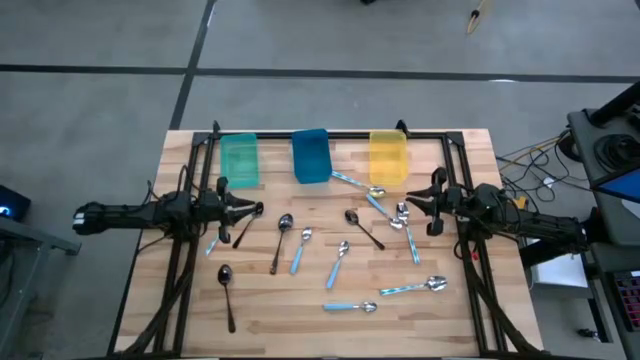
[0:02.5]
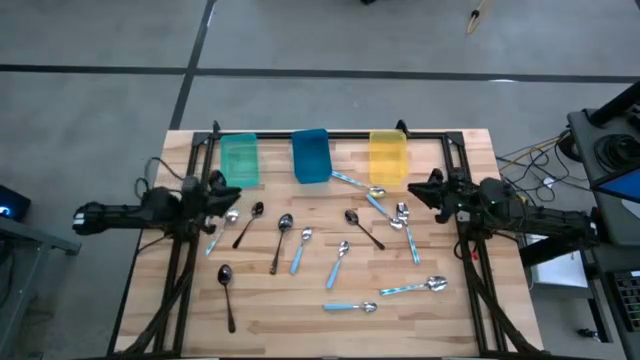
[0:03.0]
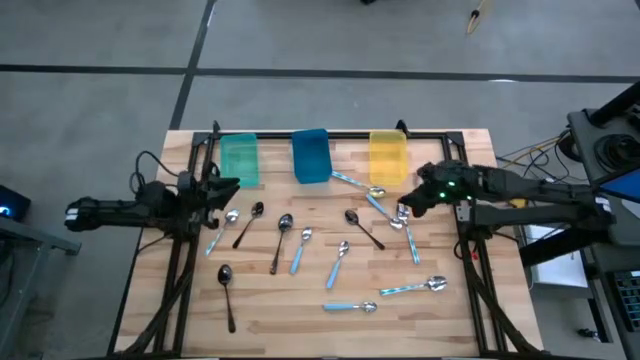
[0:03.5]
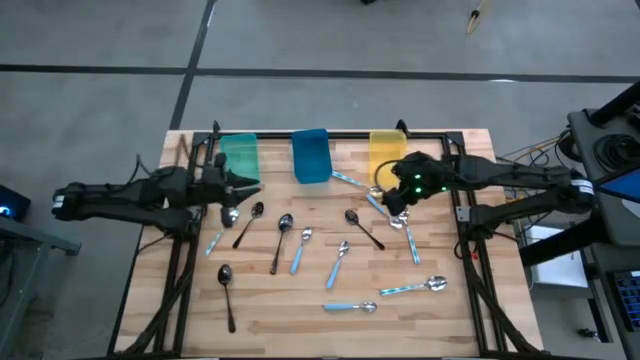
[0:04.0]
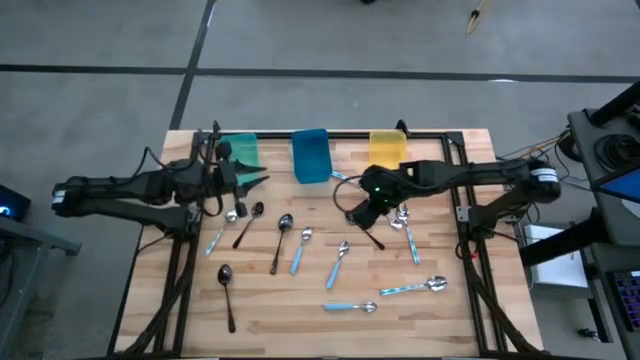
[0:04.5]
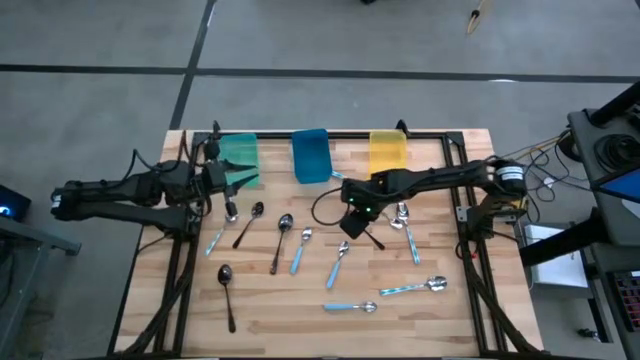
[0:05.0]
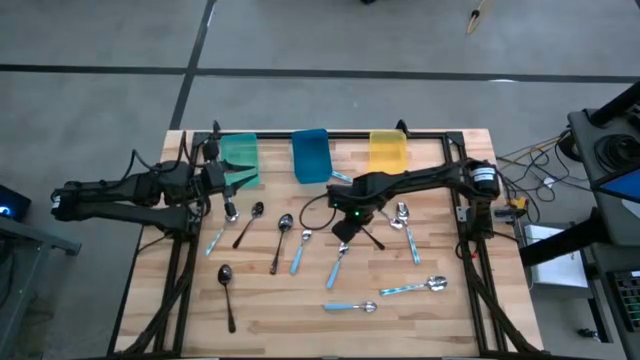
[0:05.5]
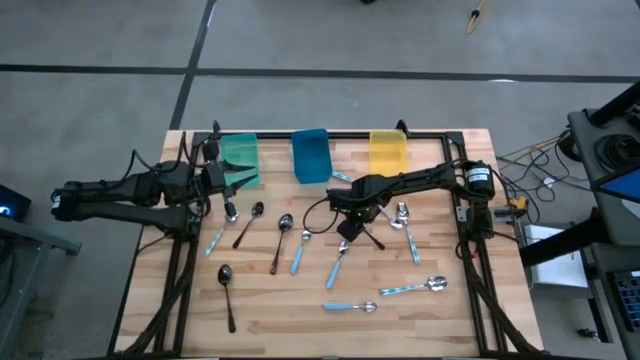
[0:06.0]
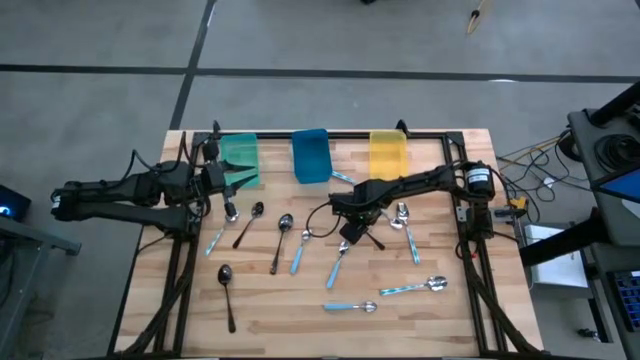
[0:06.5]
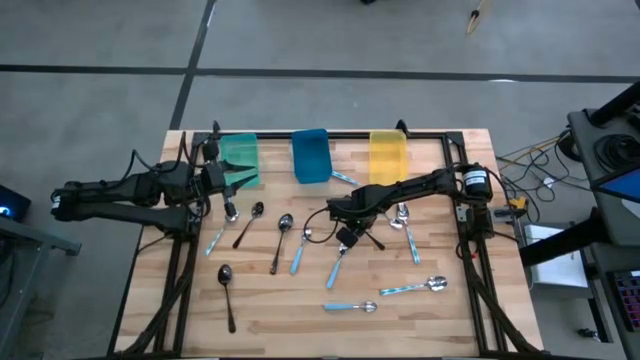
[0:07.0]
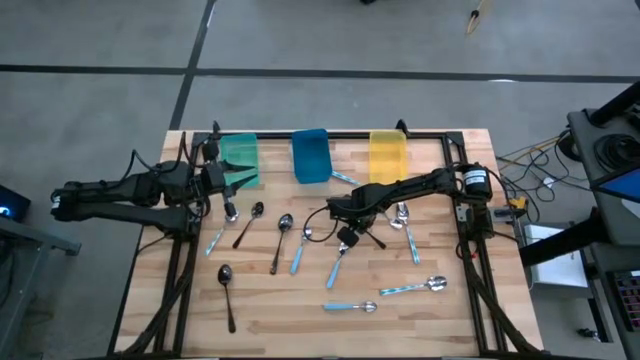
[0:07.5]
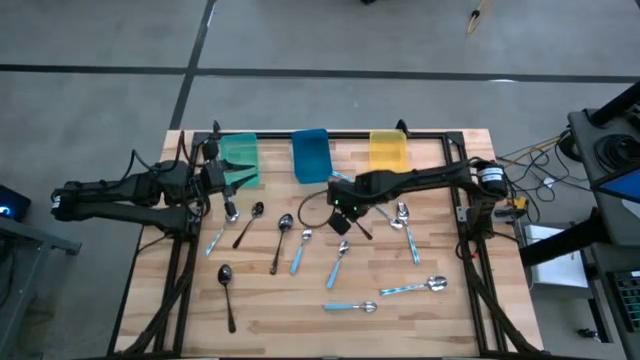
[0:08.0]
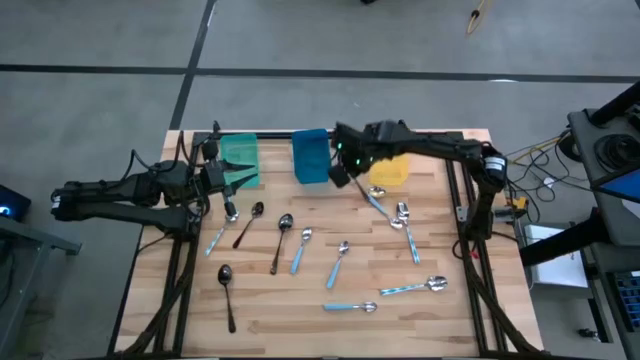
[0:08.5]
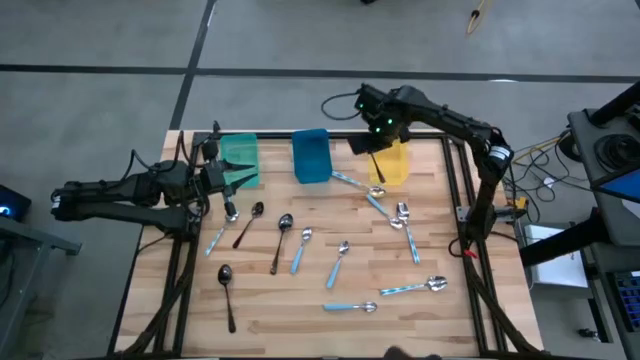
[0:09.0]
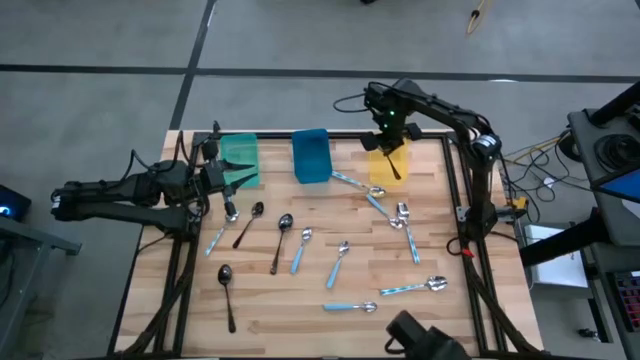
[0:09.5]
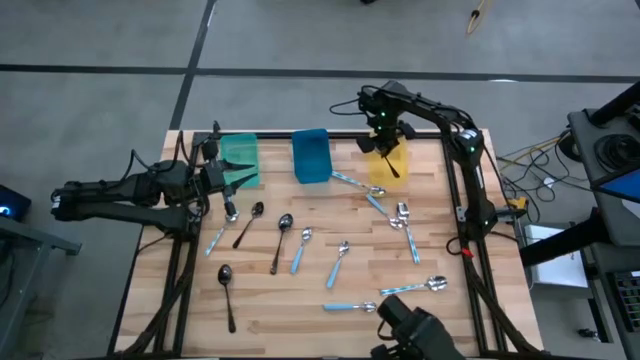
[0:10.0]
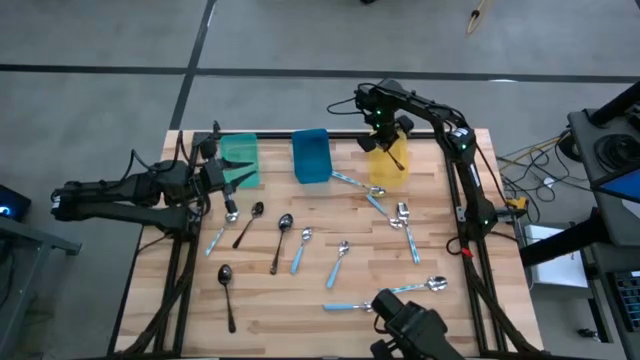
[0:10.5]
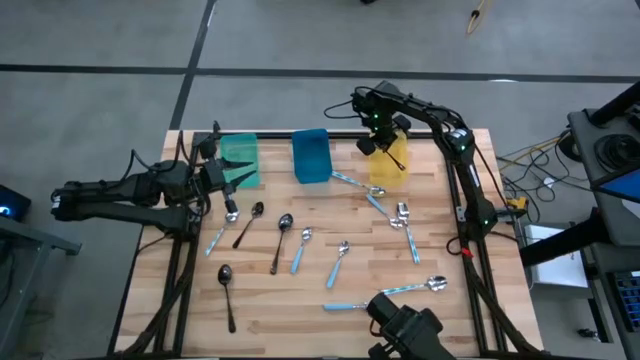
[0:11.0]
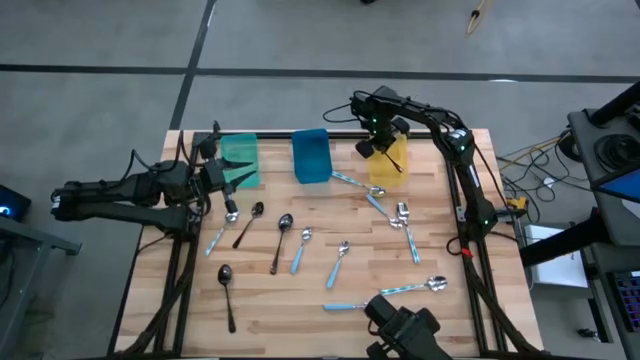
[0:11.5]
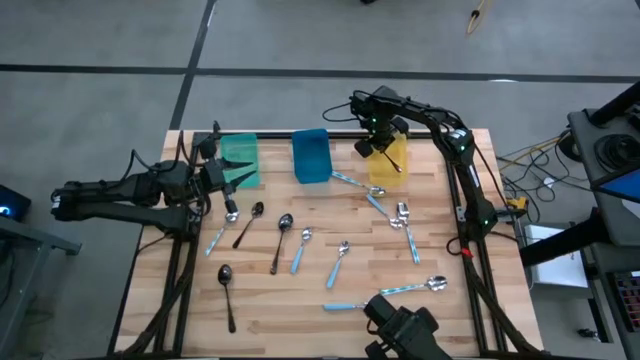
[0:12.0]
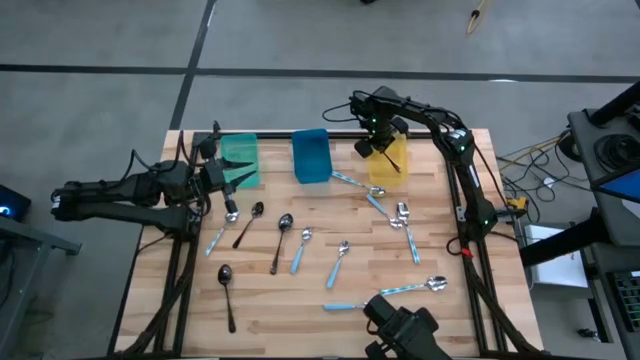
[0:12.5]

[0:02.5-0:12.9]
Task: Sort silverware by color (type)
Put the black spoon into the yellow bin

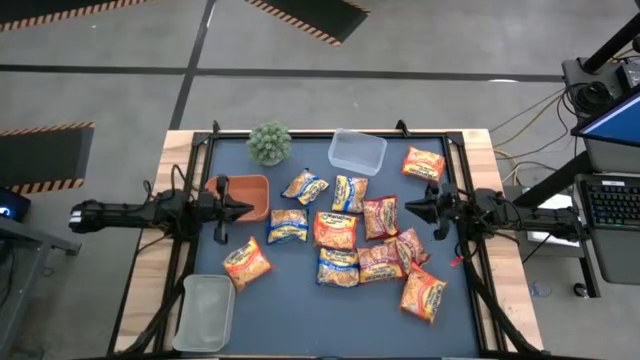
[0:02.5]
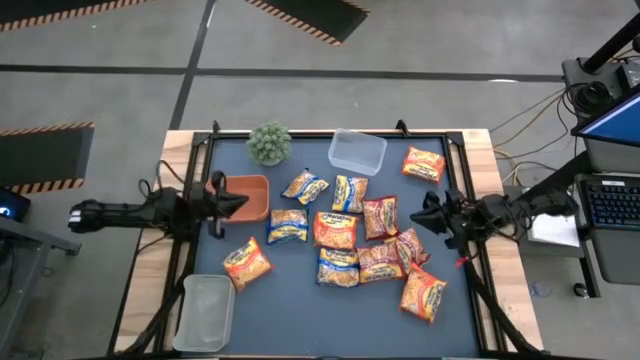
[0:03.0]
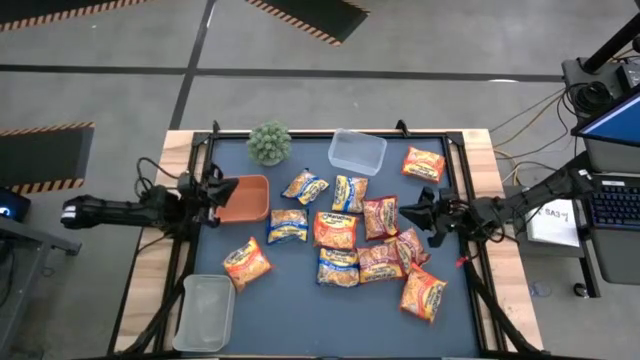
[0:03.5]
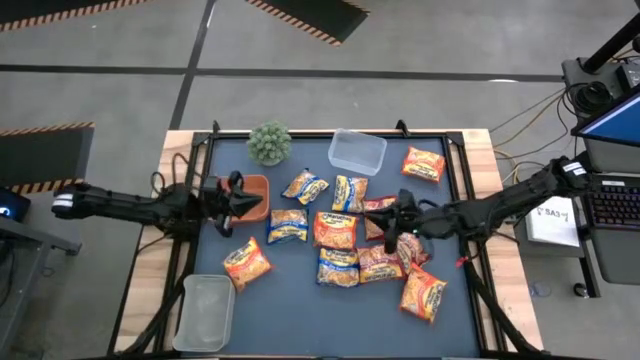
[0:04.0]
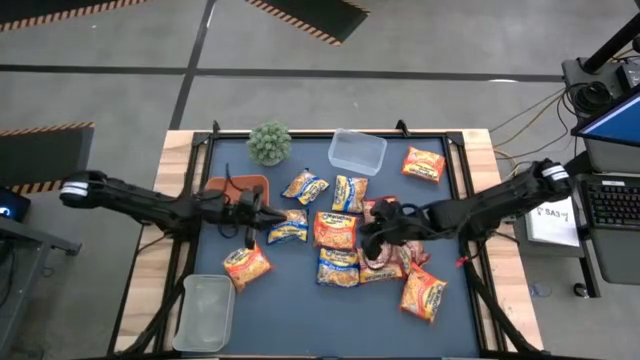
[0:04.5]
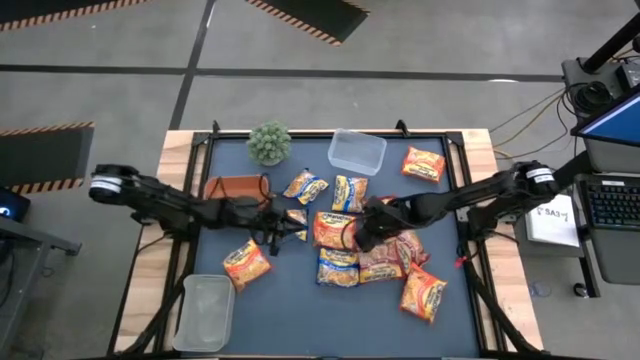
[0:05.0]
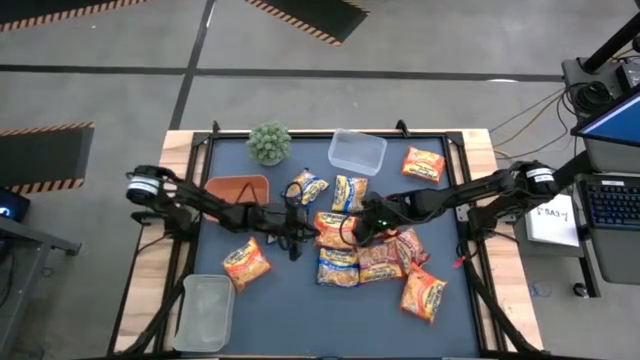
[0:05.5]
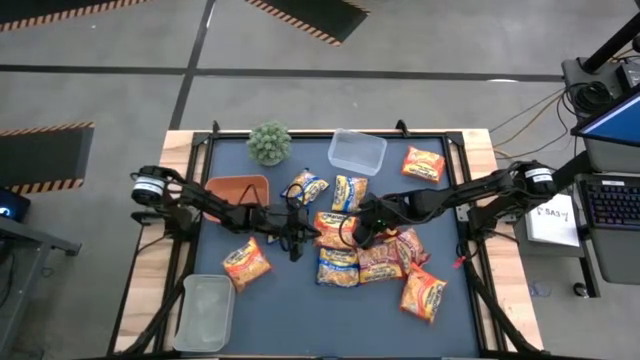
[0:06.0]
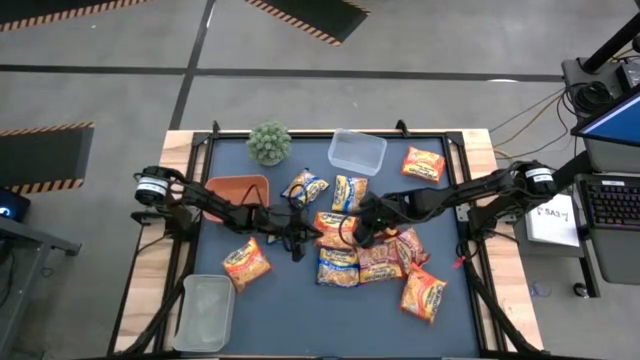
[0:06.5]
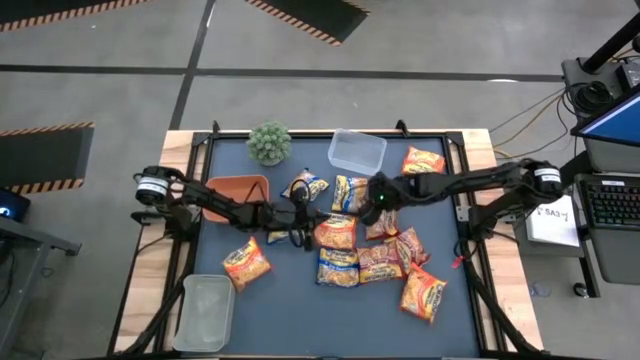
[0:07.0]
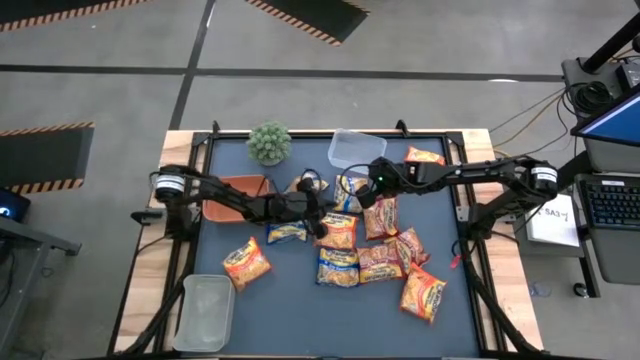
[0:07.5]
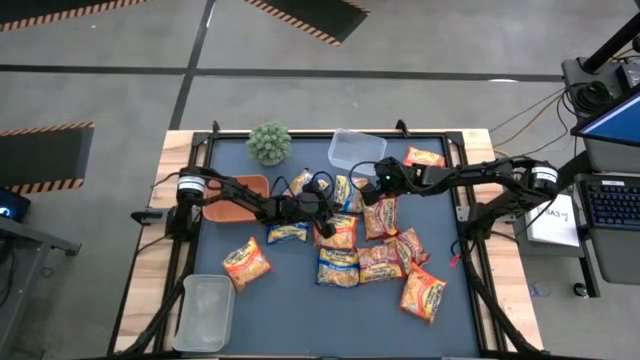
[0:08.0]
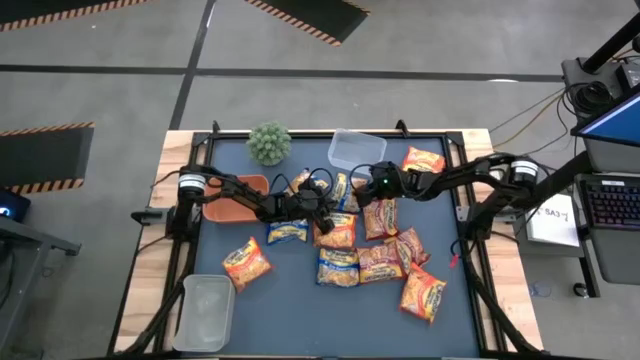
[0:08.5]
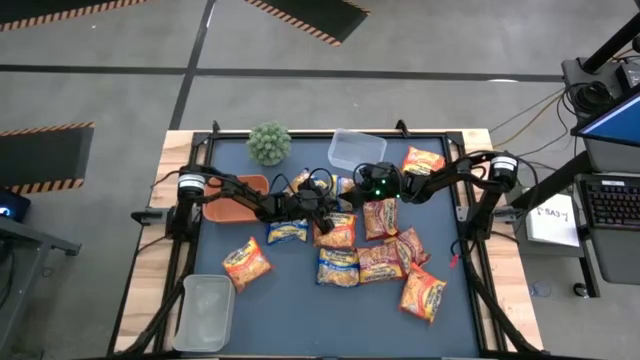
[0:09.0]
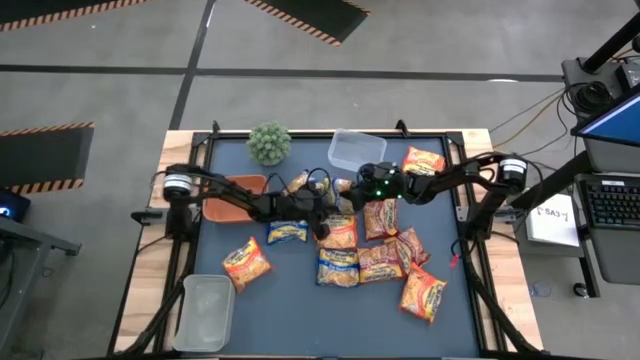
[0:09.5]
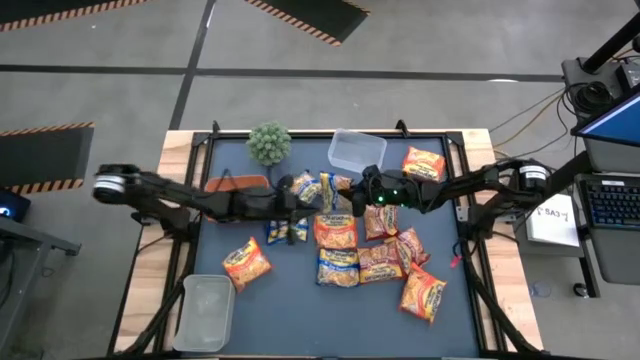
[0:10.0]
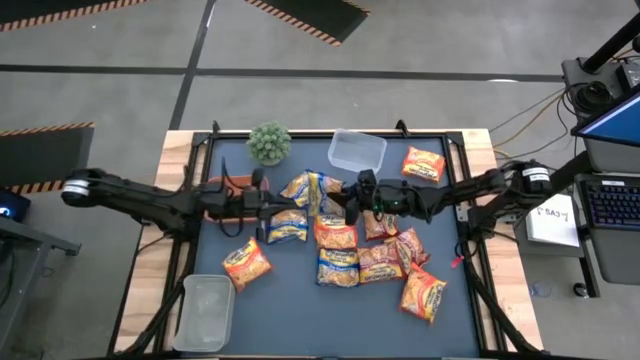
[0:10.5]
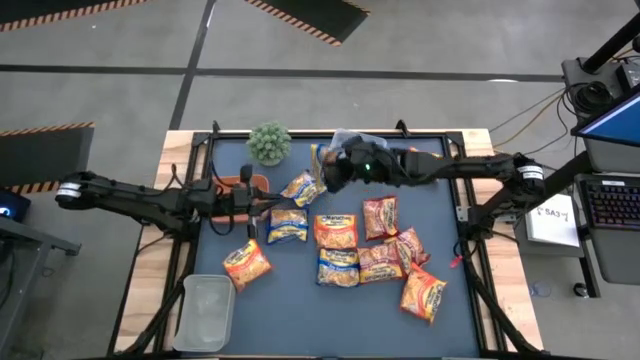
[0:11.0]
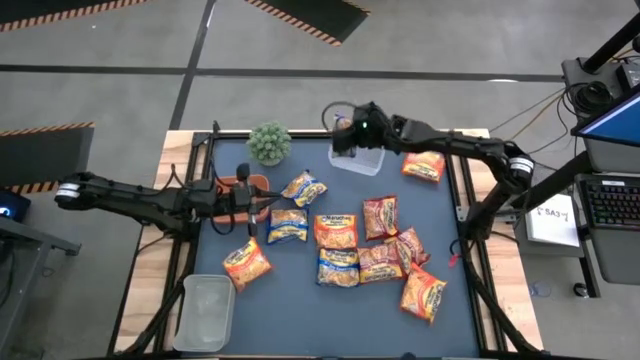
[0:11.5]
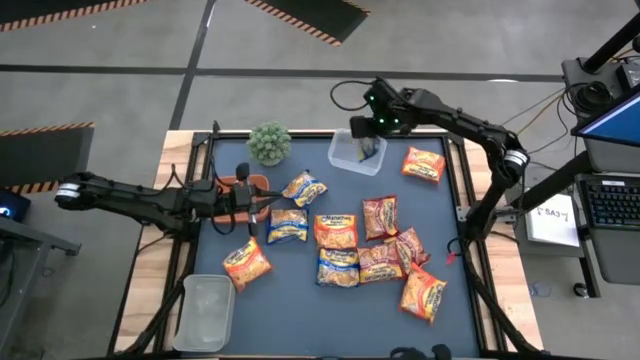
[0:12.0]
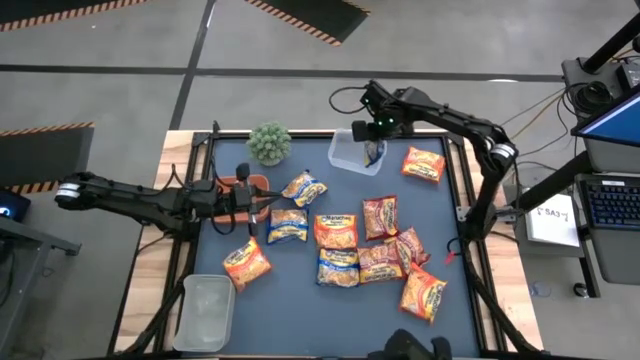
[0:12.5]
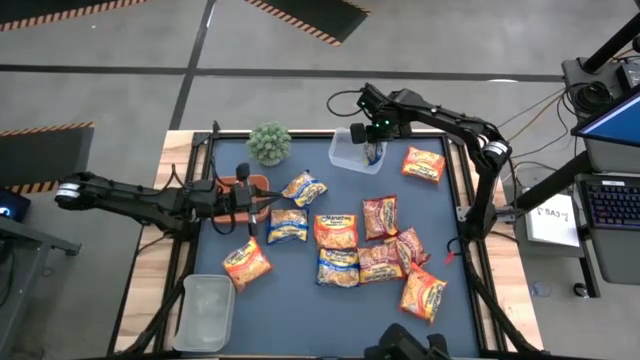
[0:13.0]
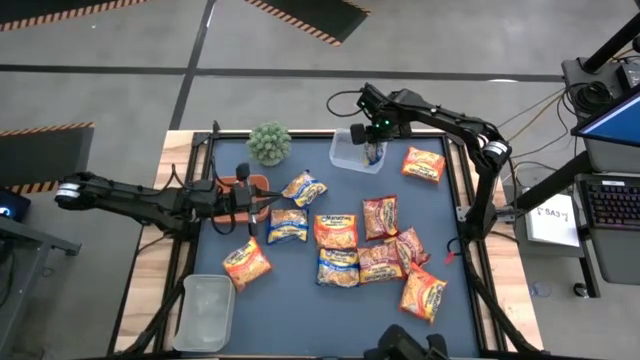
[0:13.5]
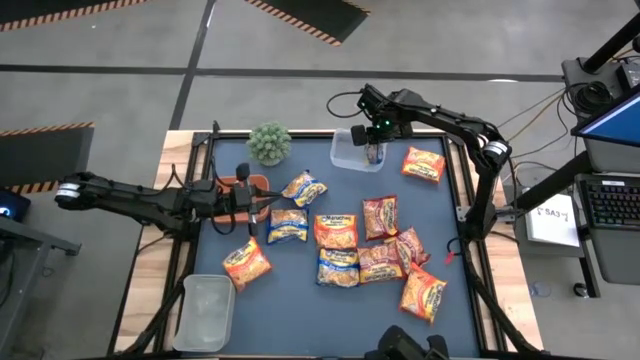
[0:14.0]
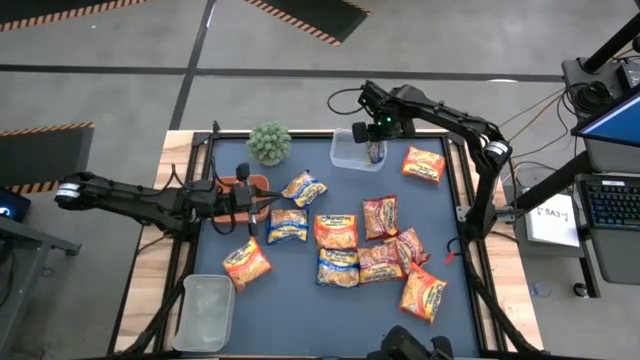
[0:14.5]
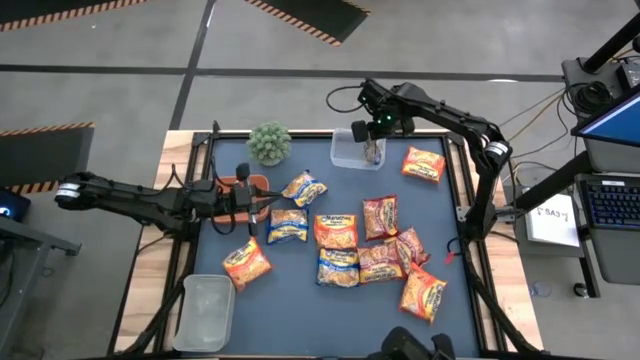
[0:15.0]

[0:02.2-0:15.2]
Task: Sort Maruchan noodles
Put the blue noodle pack into the transparent bin
